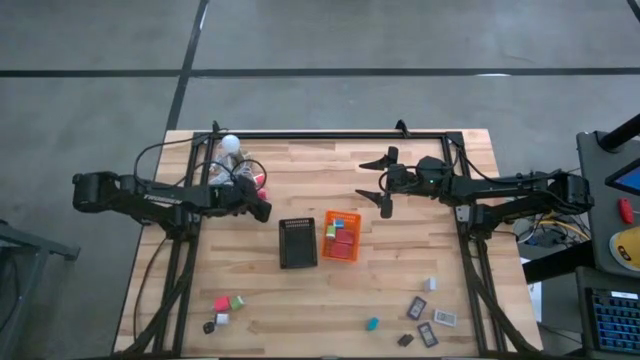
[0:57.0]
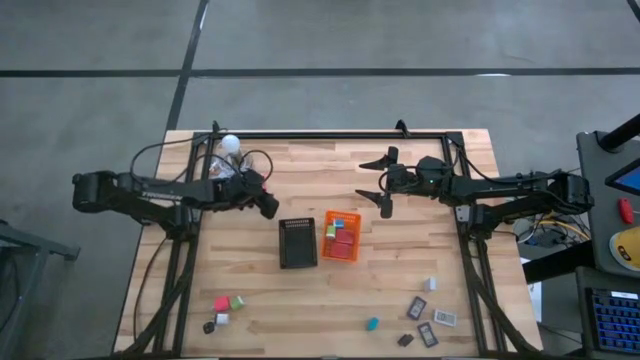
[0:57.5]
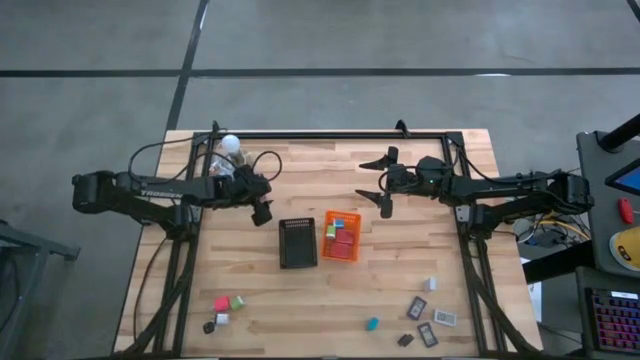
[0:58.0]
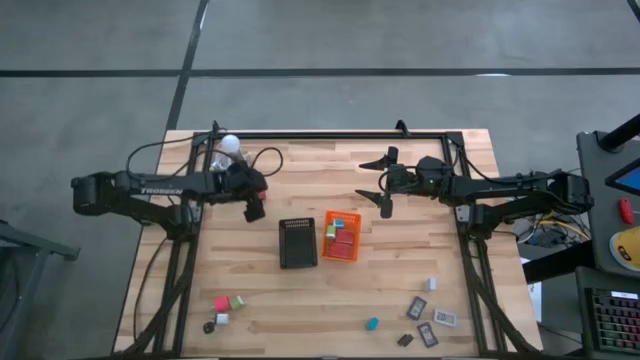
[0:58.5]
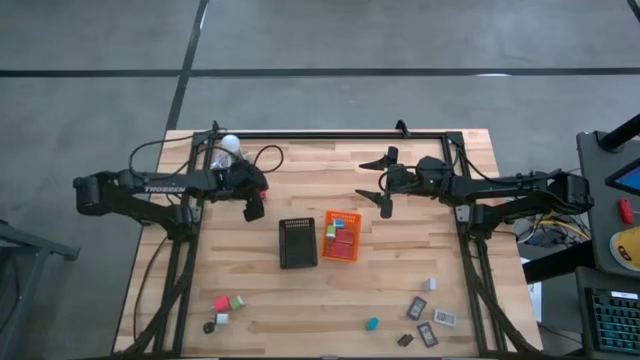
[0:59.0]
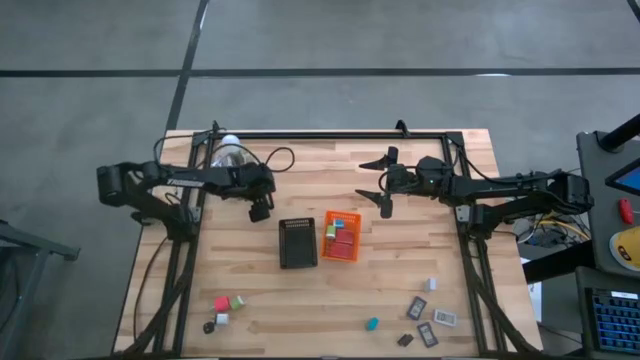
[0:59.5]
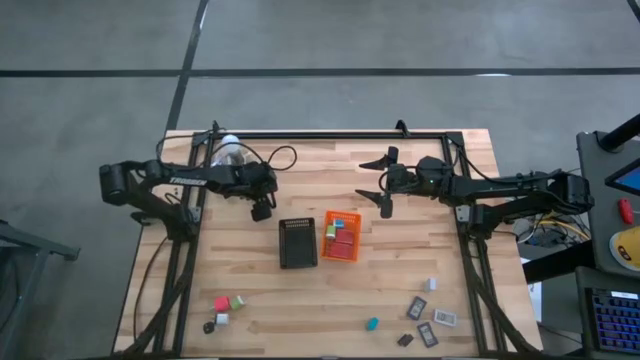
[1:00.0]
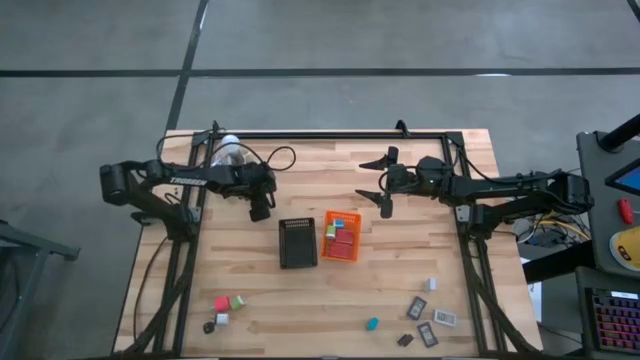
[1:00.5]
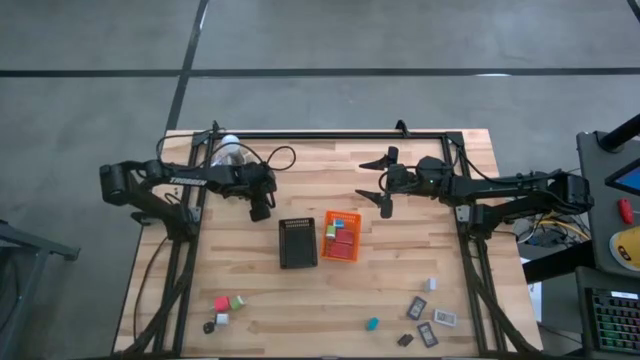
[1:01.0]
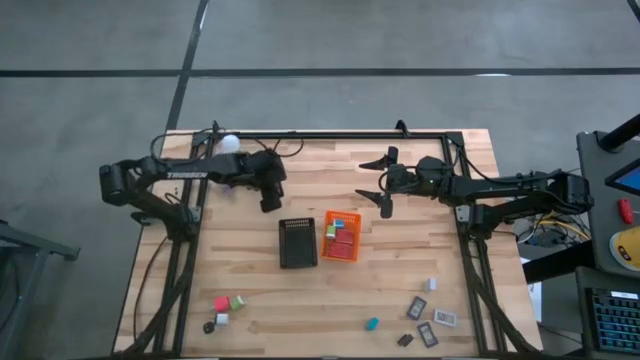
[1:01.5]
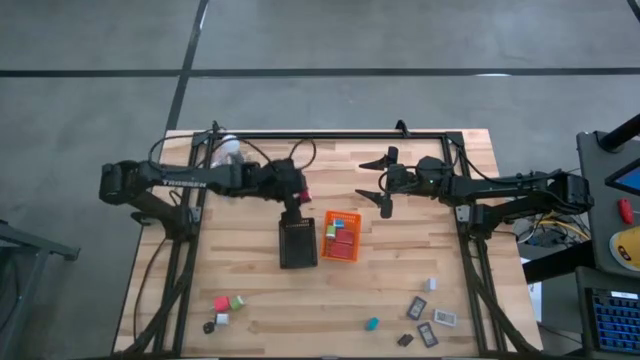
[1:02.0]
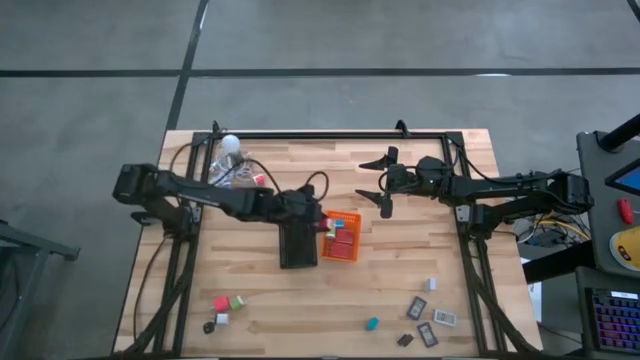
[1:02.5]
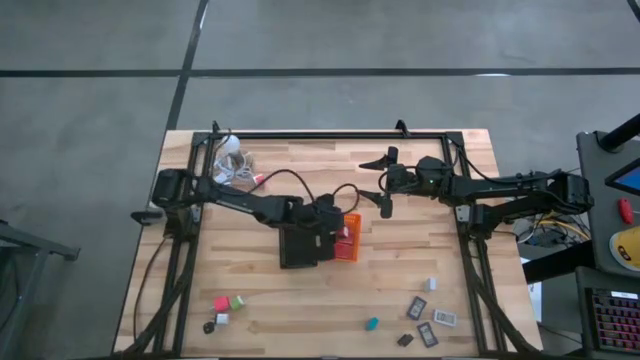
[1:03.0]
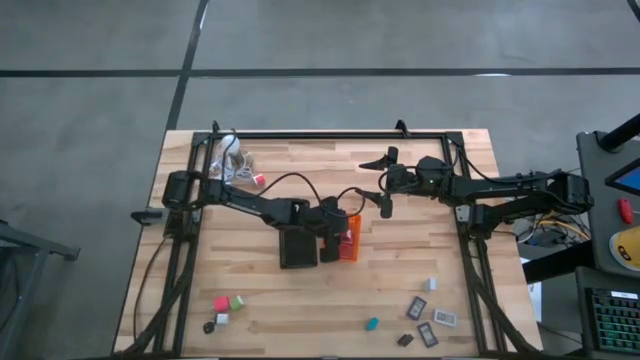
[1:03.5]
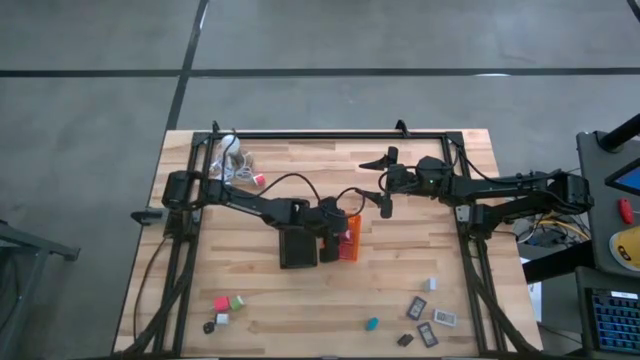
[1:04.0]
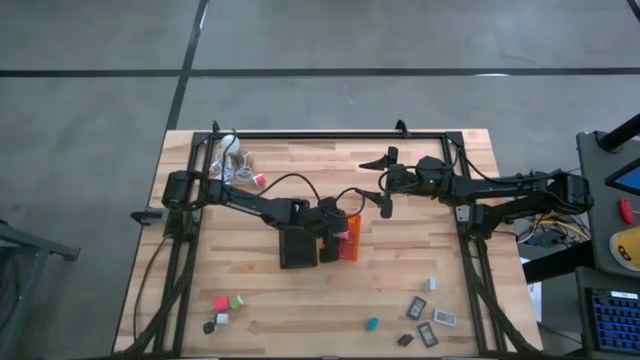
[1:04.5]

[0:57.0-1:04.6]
Task: Pick & Place Office items
Put the bottom light pink charger adapter into the orange bin

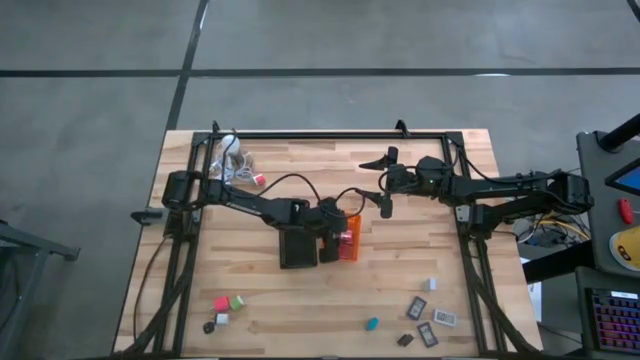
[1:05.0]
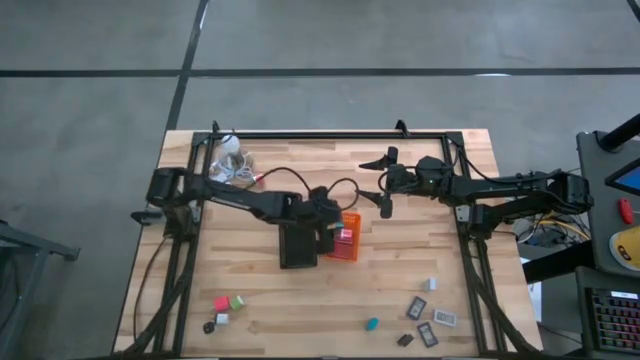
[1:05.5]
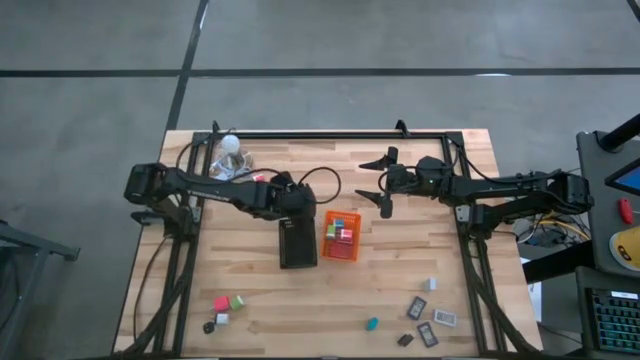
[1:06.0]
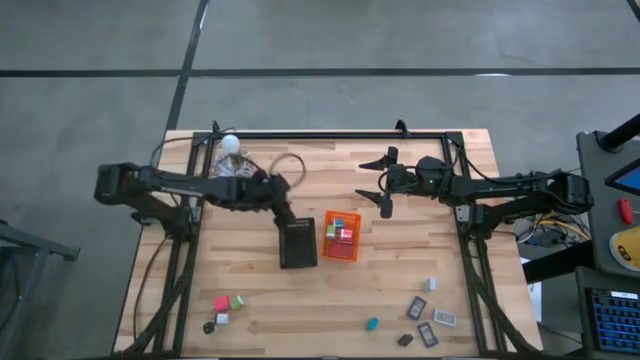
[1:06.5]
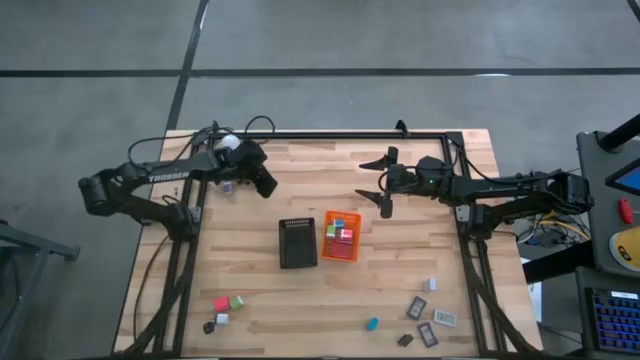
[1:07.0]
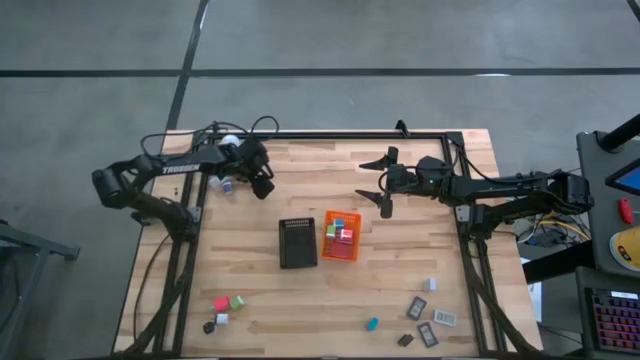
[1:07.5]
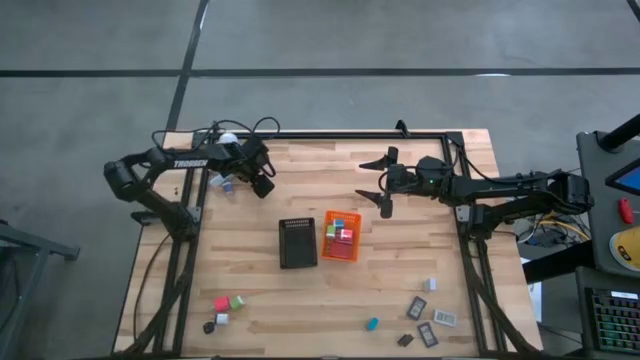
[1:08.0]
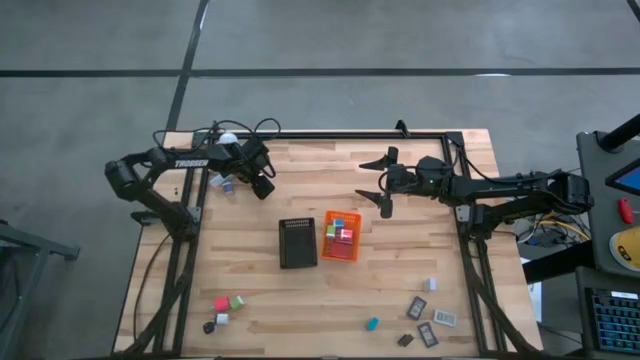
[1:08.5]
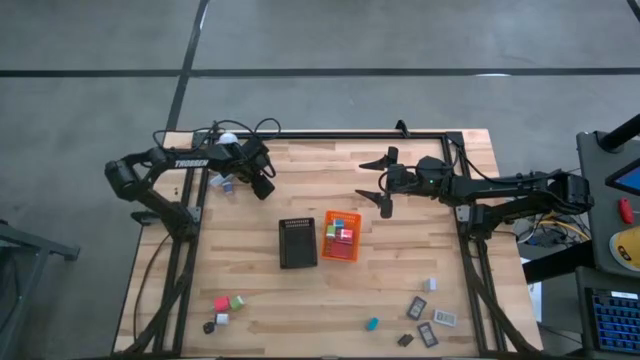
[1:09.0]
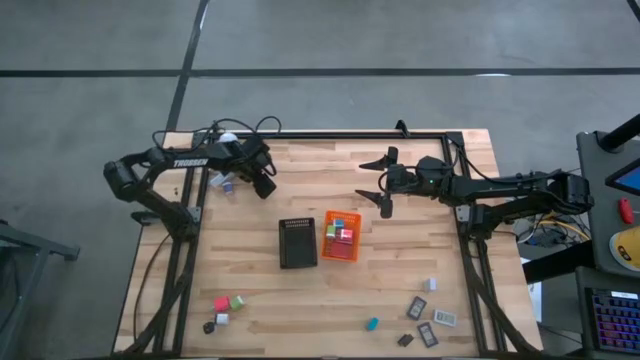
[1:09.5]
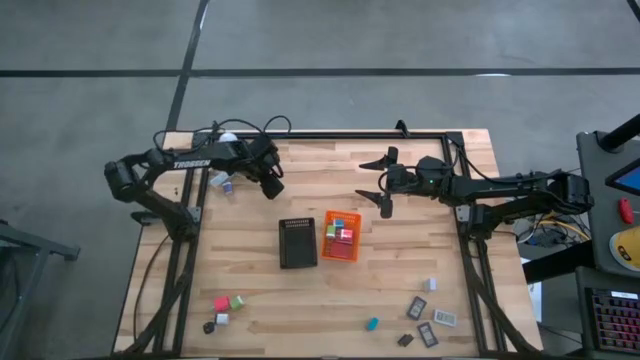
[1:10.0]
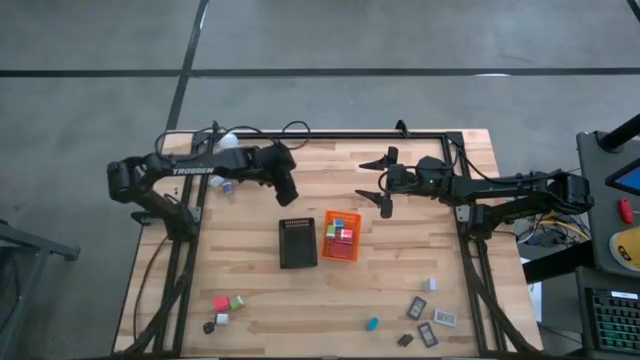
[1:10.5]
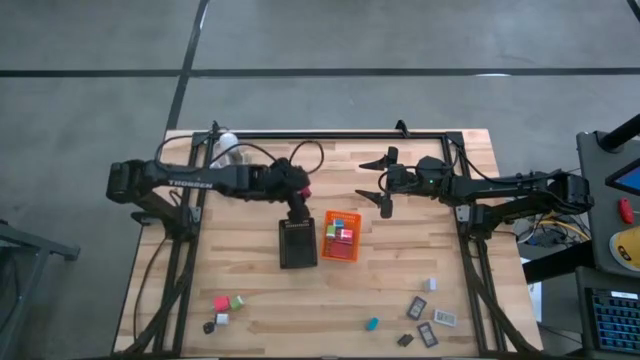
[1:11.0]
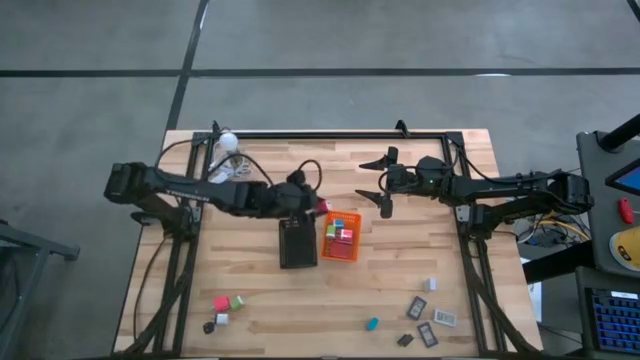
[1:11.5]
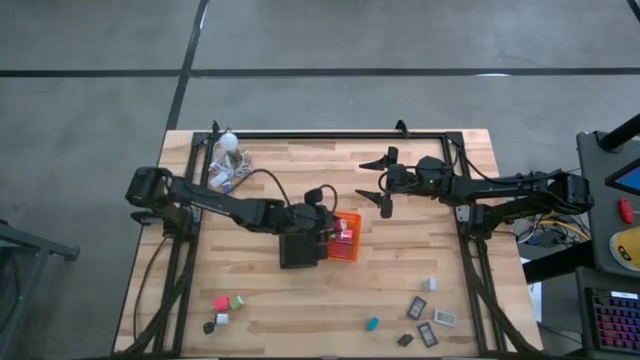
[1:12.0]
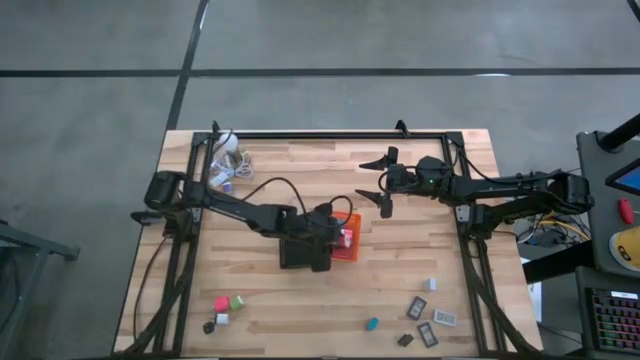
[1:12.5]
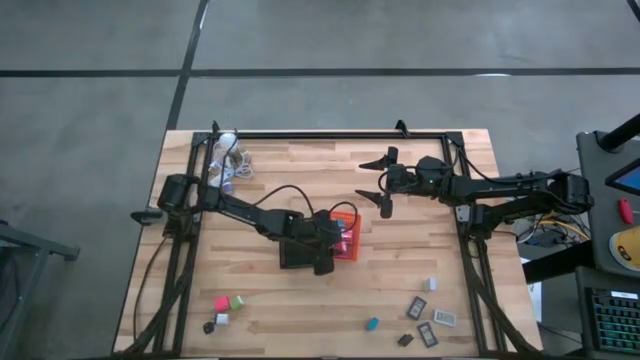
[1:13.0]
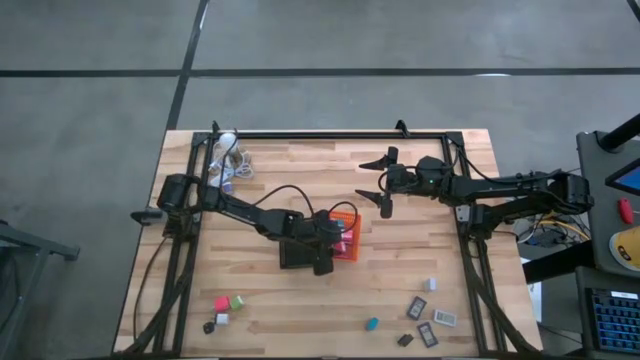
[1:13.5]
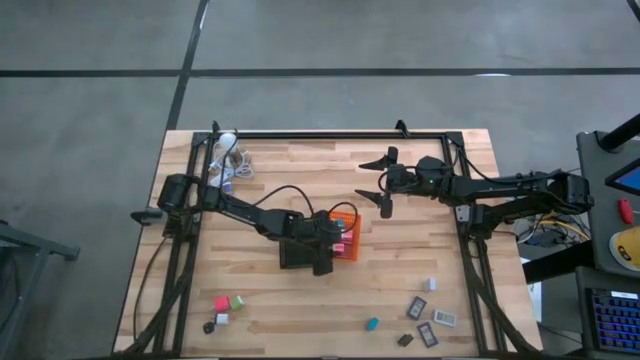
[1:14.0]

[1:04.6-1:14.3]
Put the light pink charger adapter into the orange bin

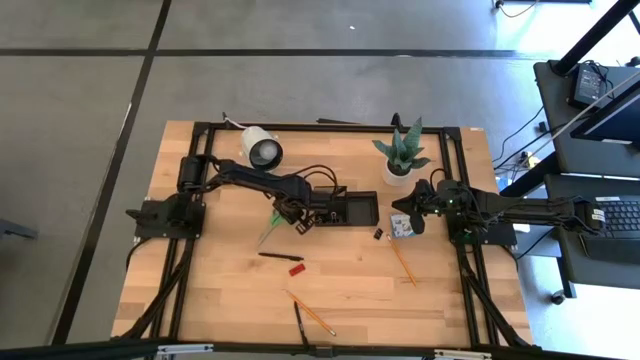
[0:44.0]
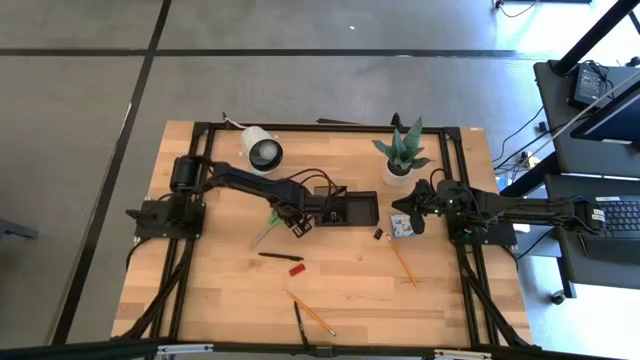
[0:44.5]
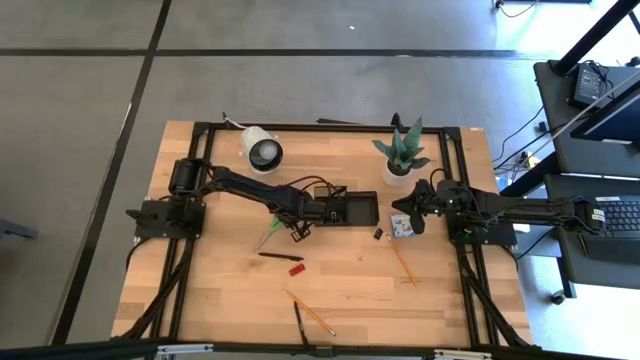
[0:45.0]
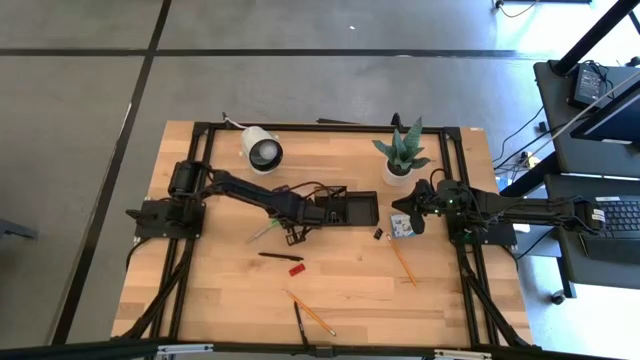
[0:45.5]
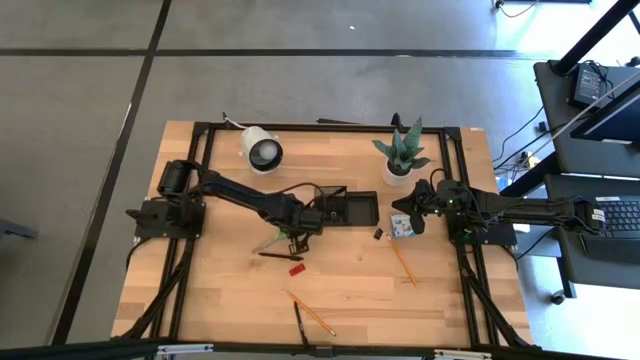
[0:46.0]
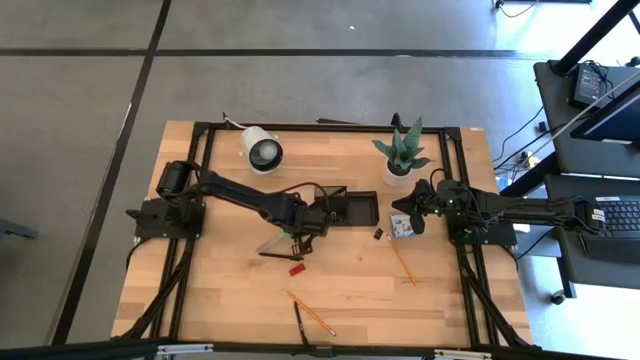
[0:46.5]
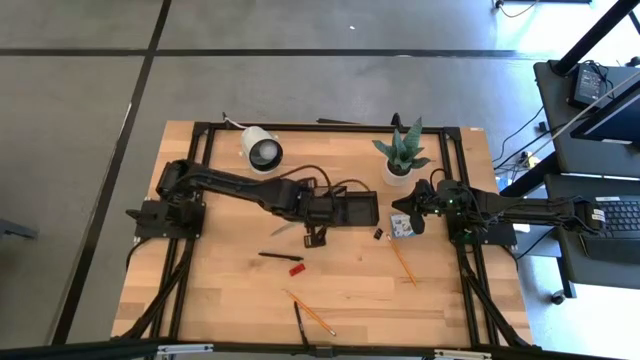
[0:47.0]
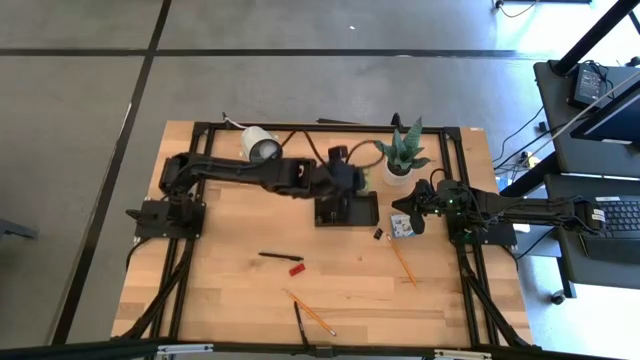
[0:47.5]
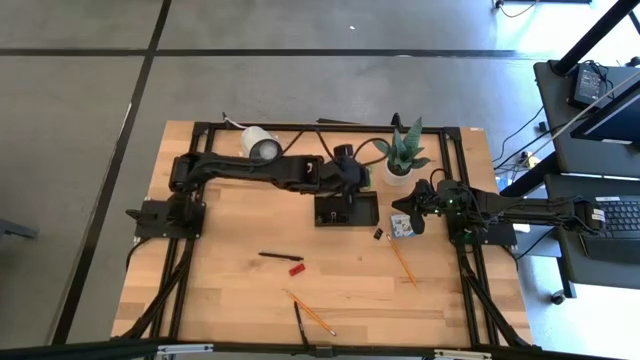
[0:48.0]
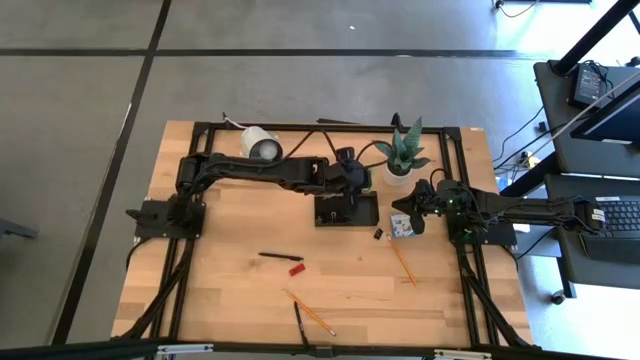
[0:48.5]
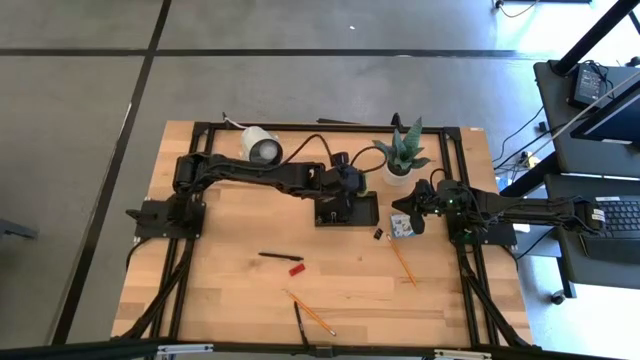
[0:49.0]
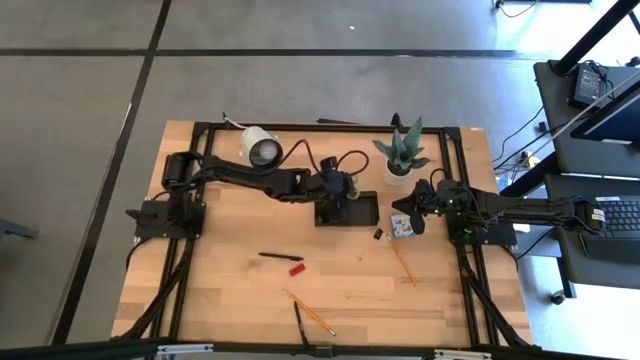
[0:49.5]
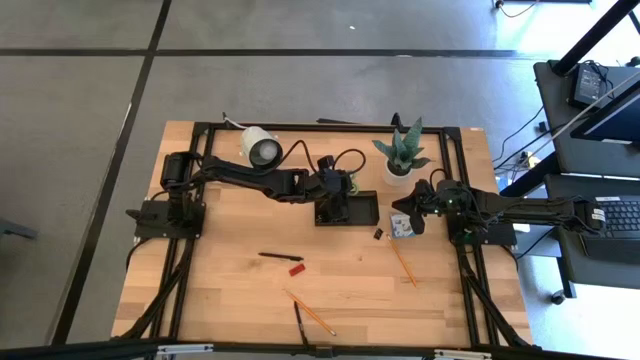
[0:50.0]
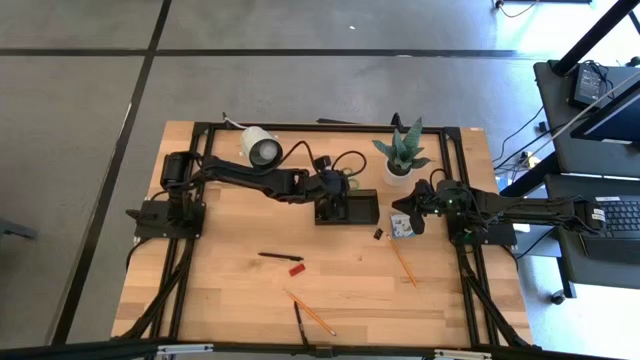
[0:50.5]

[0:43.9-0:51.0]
Task: Pick and place office supplies into organizer
Put the green scissors in the desk organizer
